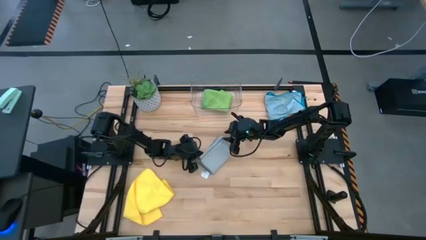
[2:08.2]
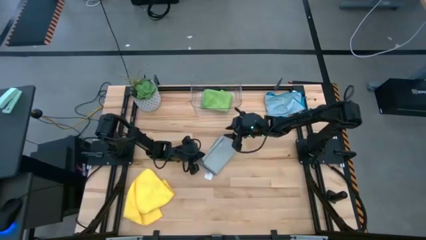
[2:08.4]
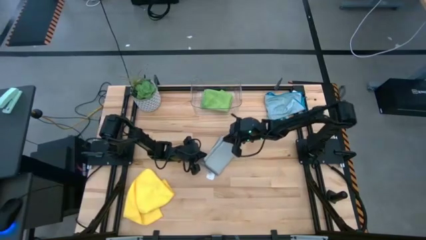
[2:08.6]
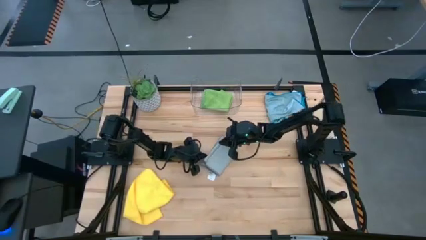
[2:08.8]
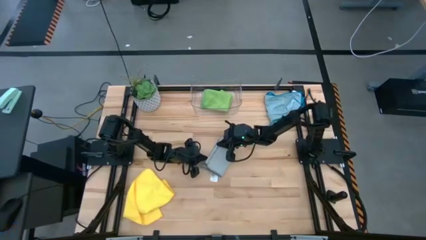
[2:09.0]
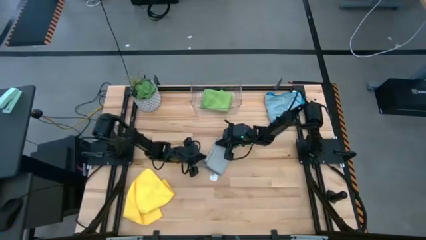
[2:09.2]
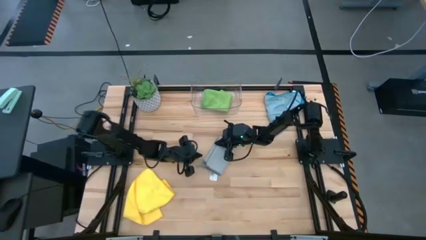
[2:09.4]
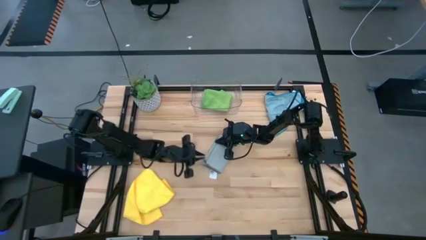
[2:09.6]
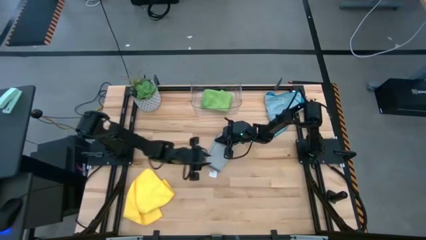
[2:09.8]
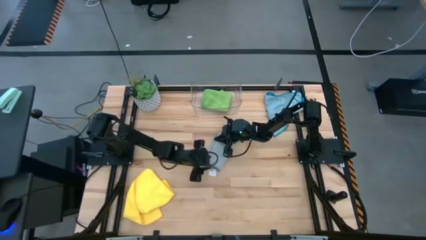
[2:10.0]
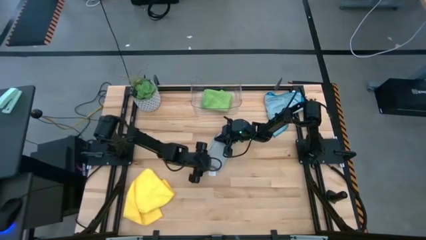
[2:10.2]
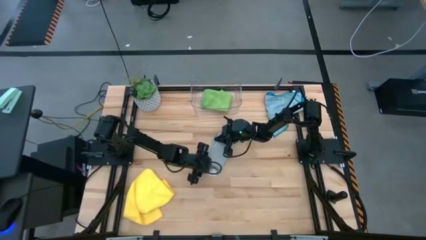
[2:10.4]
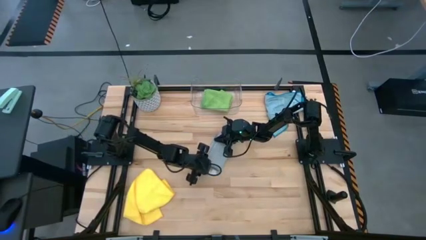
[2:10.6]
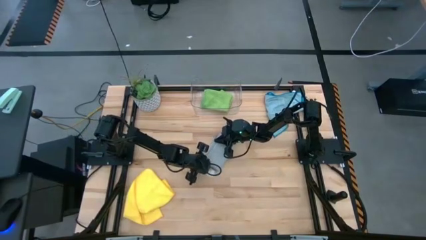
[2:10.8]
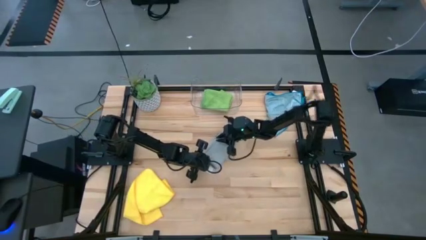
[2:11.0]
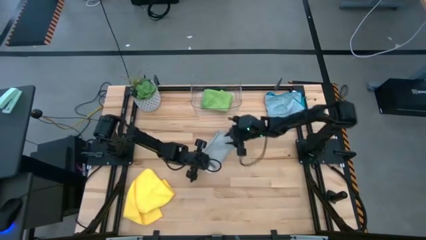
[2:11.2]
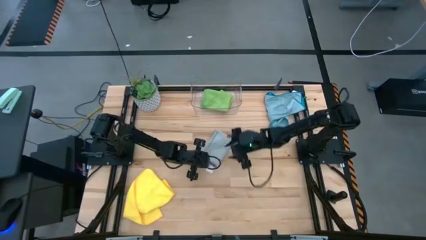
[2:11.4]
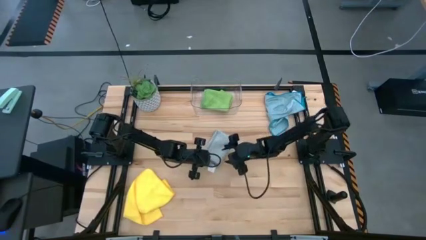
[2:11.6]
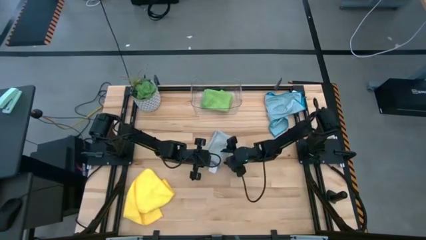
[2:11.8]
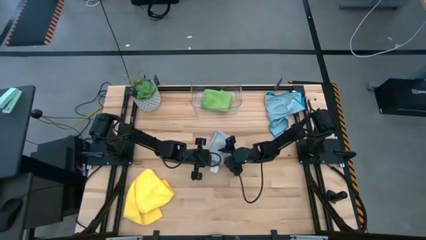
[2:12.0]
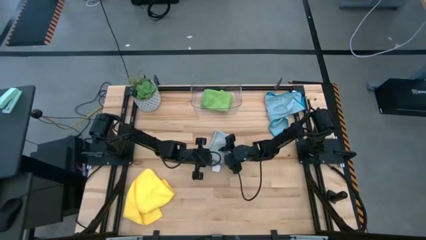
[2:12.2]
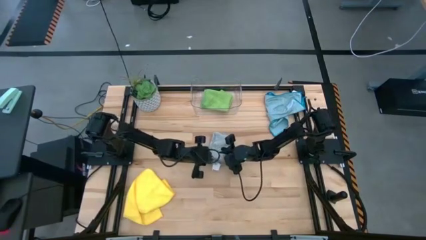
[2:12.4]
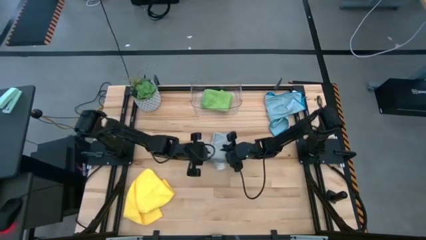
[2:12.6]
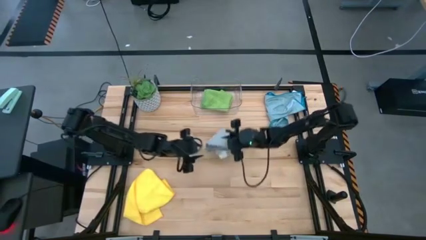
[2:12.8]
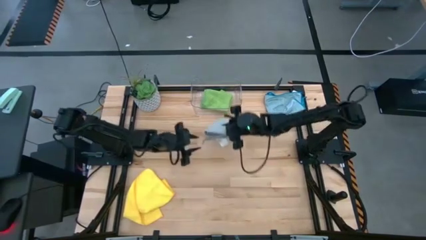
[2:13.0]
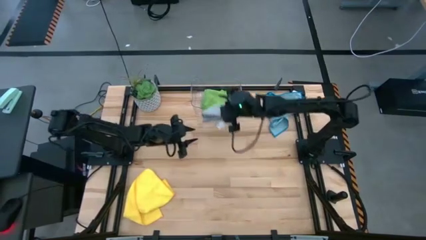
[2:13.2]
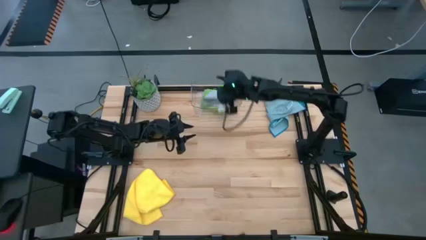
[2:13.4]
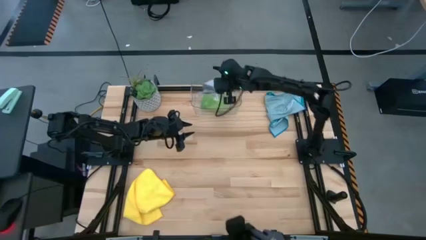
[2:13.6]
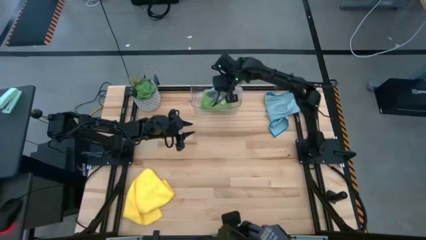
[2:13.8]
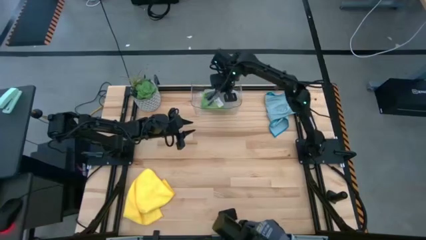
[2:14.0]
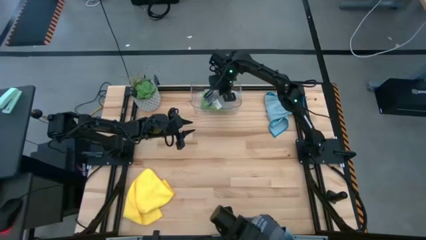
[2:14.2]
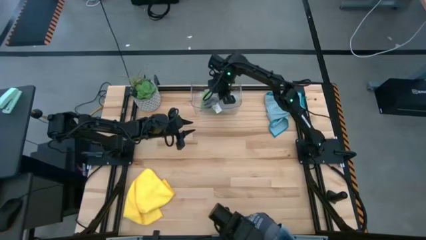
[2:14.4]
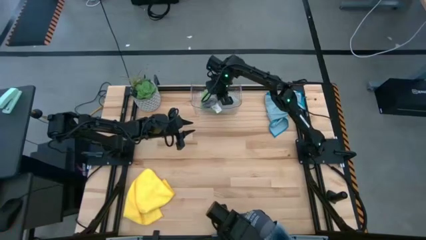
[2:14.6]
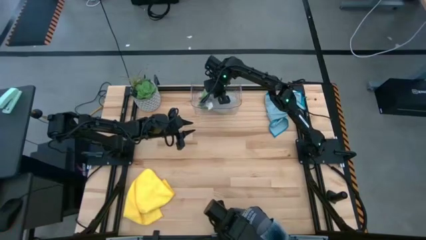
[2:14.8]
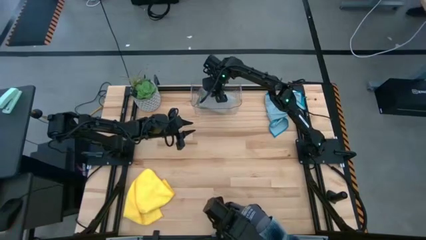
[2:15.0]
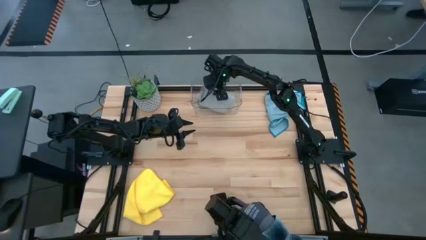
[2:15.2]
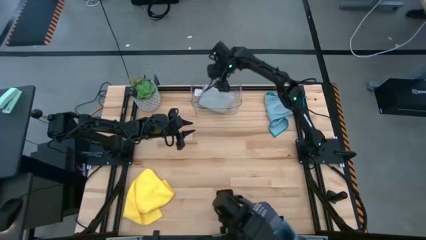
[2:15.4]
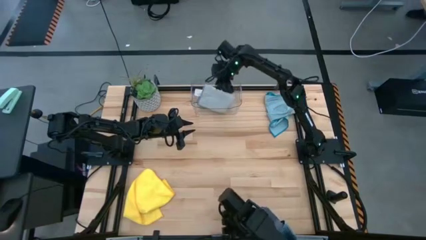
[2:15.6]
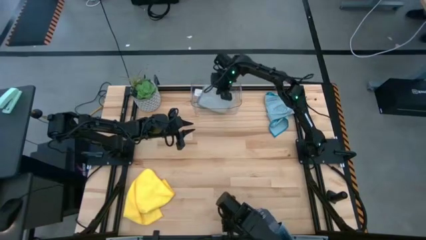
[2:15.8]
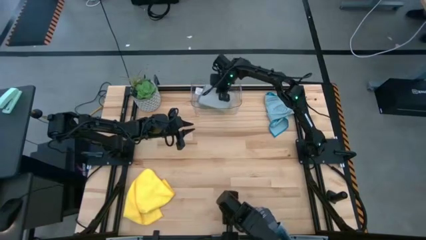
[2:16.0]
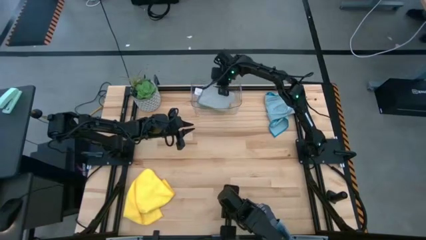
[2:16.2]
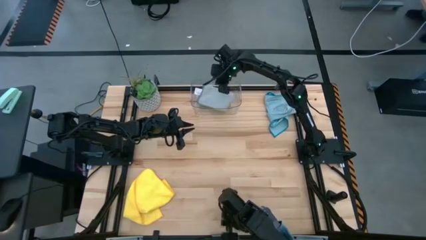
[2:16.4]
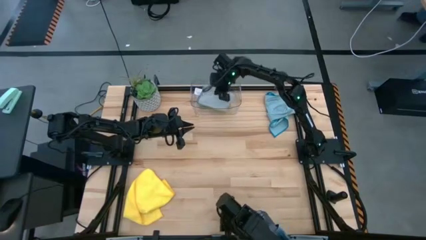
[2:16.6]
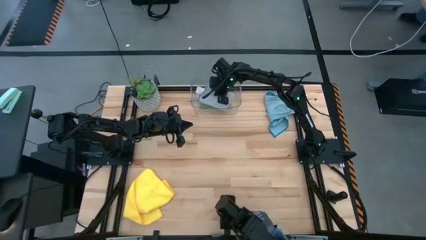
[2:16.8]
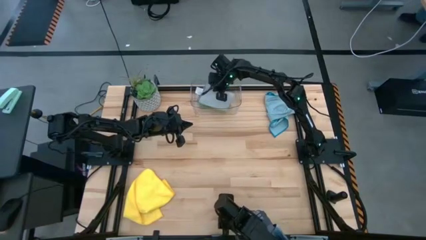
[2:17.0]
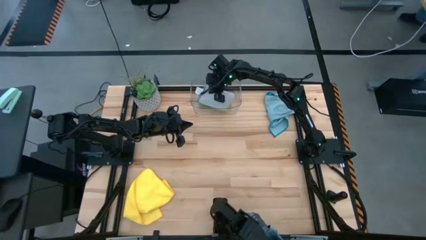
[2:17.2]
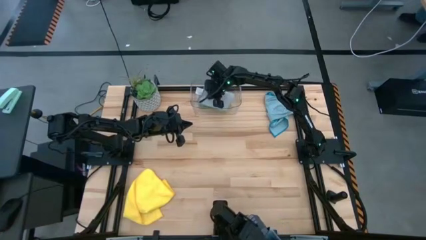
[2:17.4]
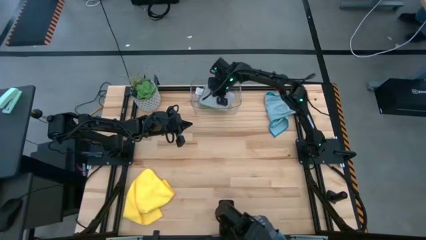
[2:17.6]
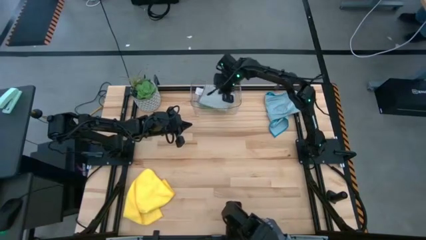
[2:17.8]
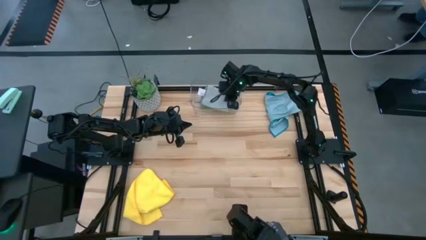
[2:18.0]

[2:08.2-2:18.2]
Task: Fold microfiber towels
Stack the folded gray microfiber cloth on top of the green microfiber cloth

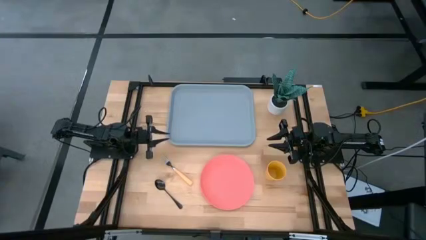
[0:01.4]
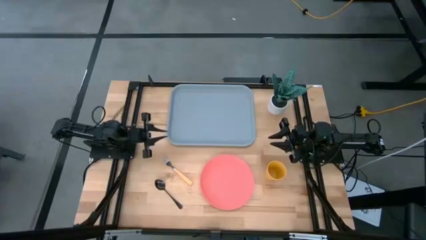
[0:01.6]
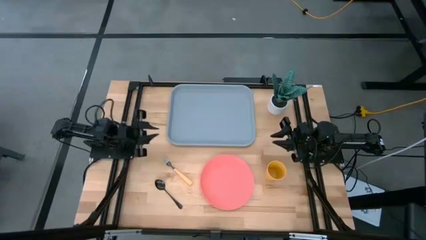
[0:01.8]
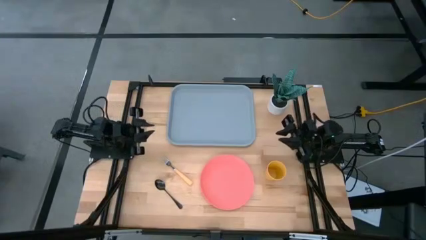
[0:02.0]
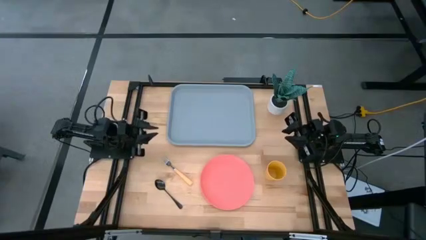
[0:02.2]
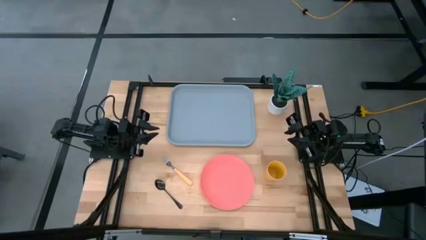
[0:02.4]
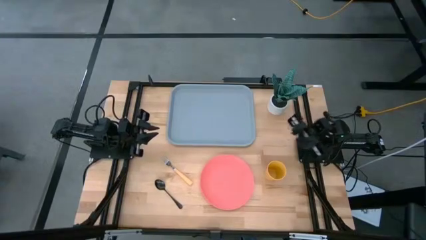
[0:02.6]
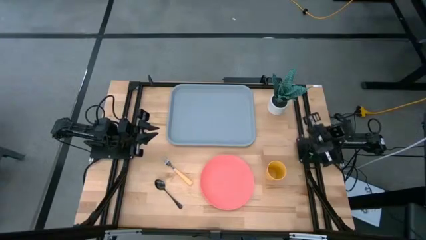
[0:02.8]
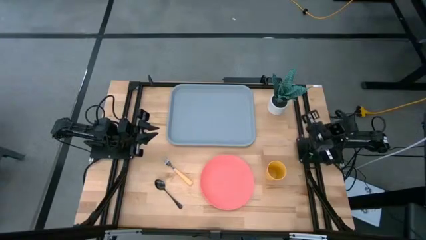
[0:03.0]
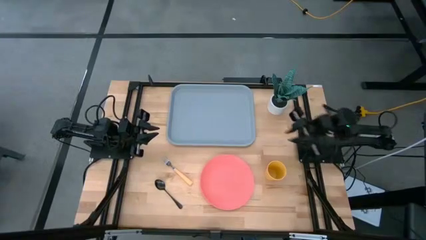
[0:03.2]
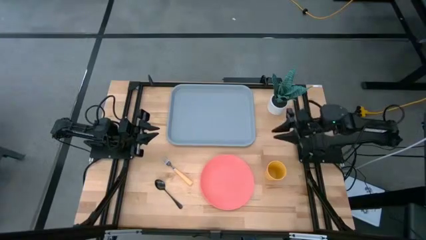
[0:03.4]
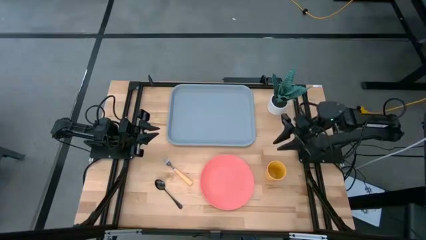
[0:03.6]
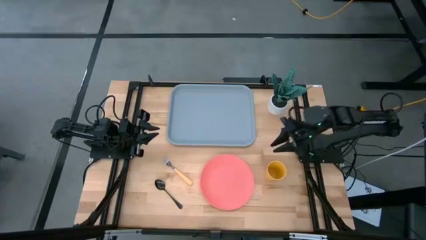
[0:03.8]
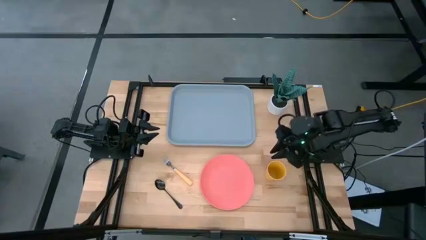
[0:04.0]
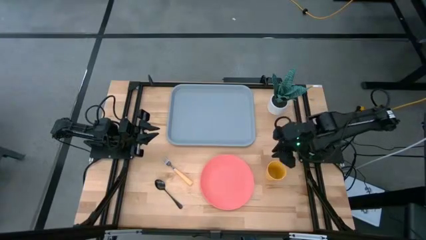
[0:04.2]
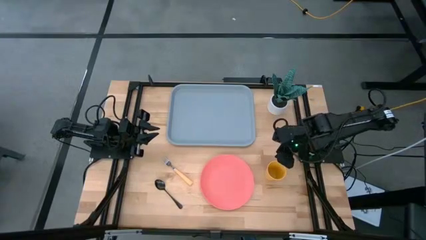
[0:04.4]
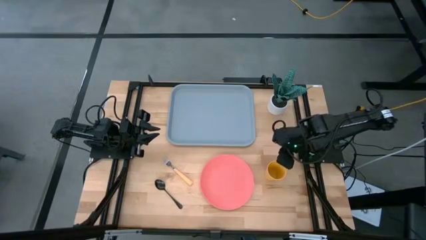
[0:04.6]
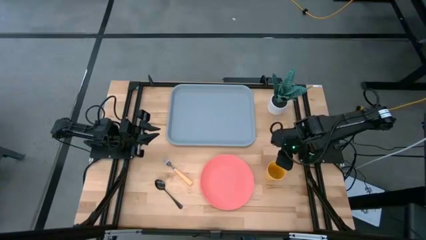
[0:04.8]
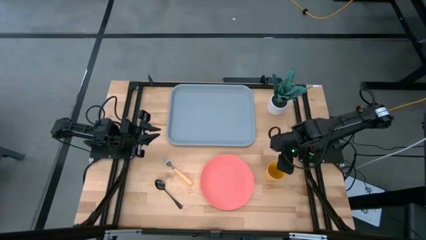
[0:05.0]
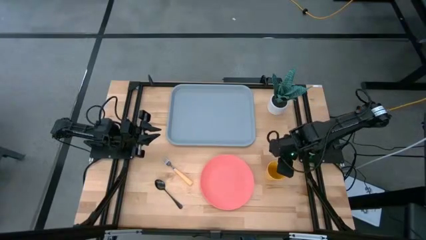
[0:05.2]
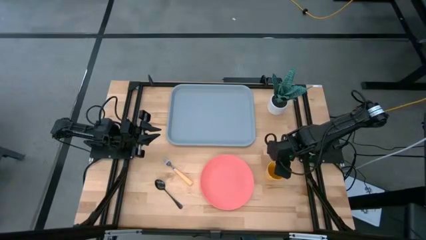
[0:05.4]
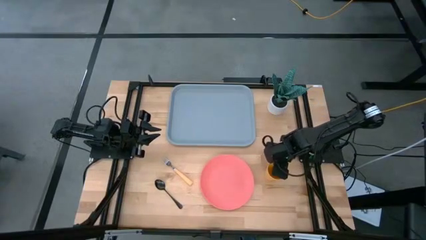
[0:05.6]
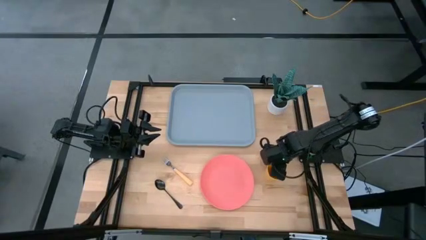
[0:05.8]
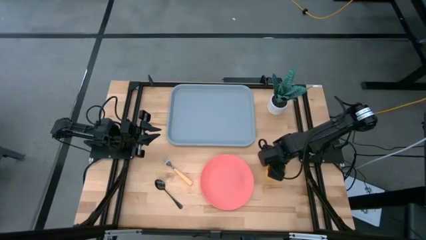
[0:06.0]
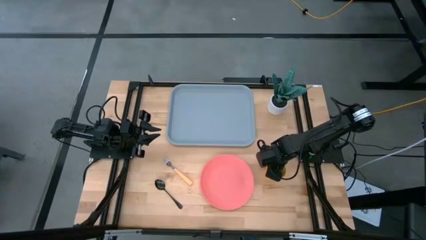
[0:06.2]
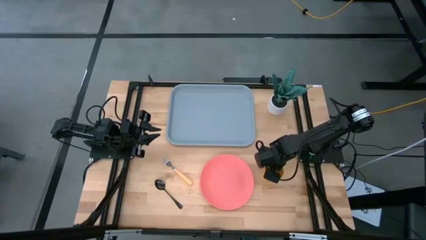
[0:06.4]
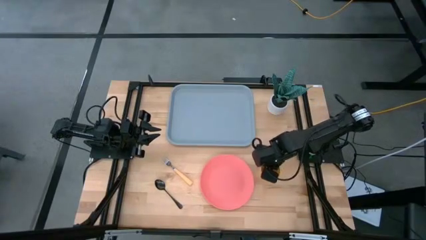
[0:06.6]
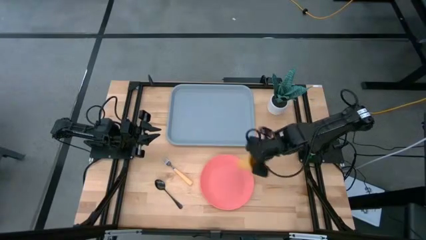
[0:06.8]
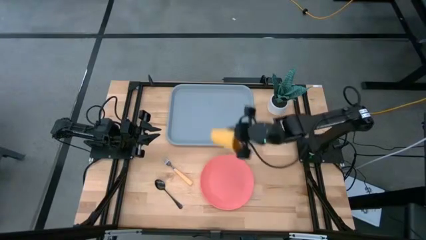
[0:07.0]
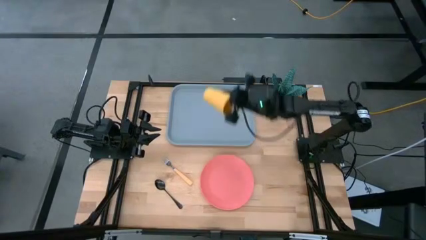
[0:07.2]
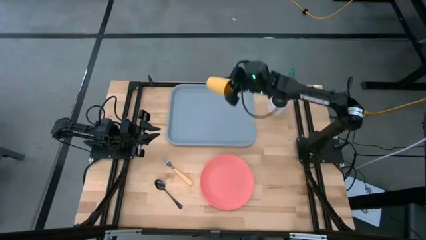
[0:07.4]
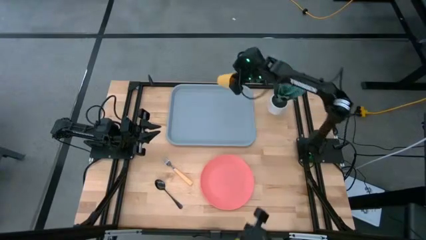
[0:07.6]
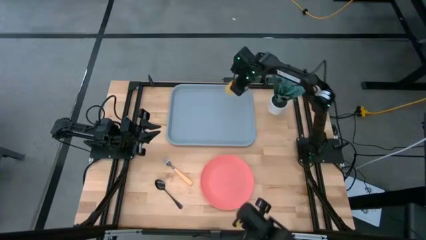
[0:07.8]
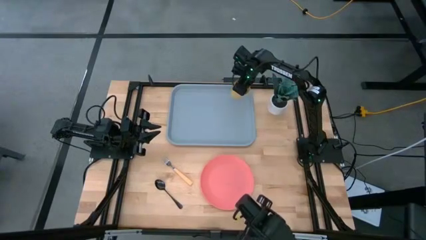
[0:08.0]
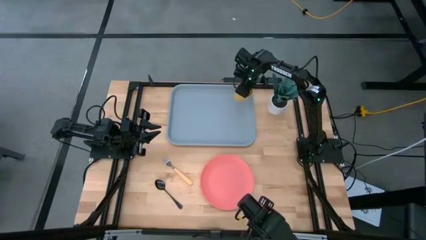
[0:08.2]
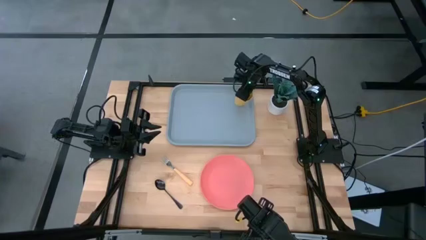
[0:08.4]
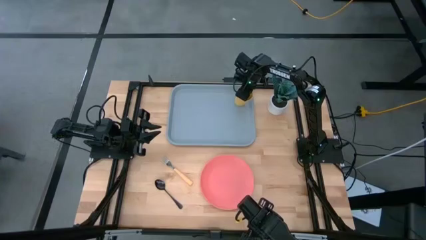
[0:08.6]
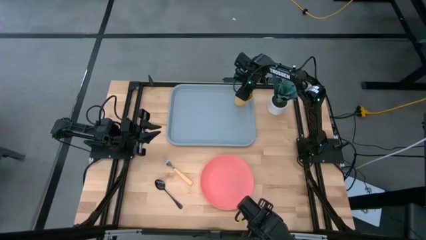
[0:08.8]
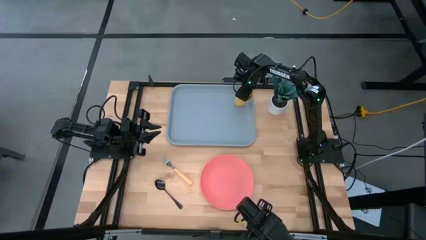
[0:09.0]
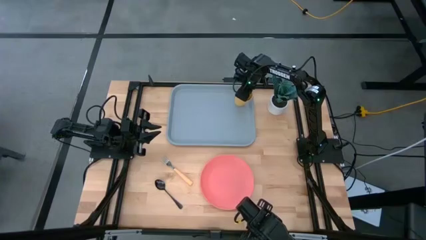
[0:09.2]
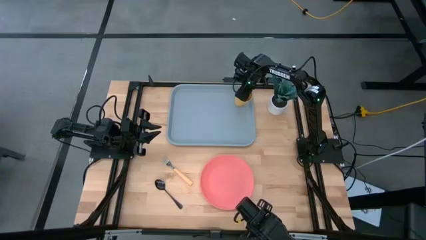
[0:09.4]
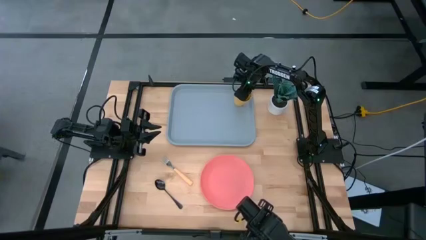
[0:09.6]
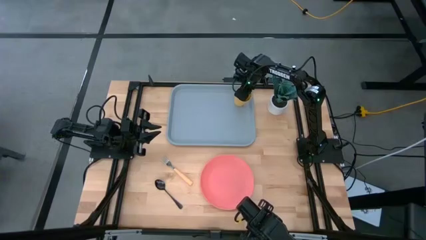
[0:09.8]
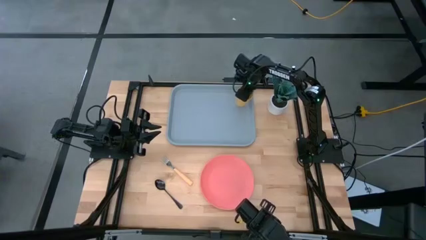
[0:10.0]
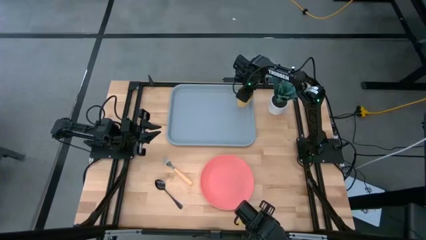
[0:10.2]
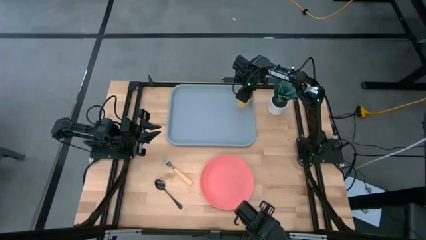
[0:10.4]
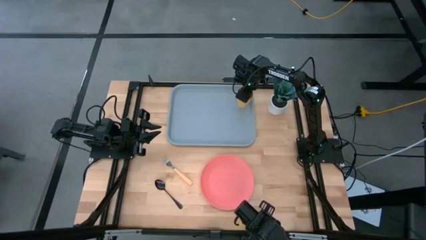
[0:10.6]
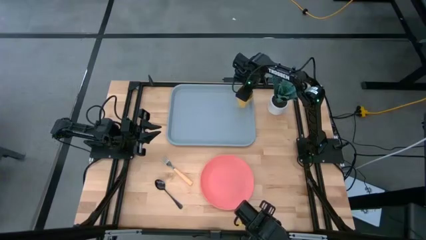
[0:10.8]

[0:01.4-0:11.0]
Task: Pick and place plate/cup/fork/spoon on tray
Put the yellow cup on the top right of the blue tray
